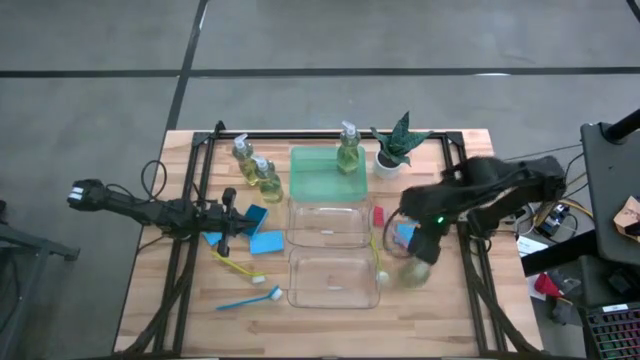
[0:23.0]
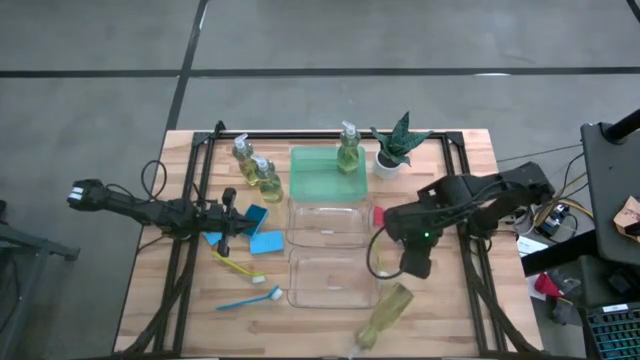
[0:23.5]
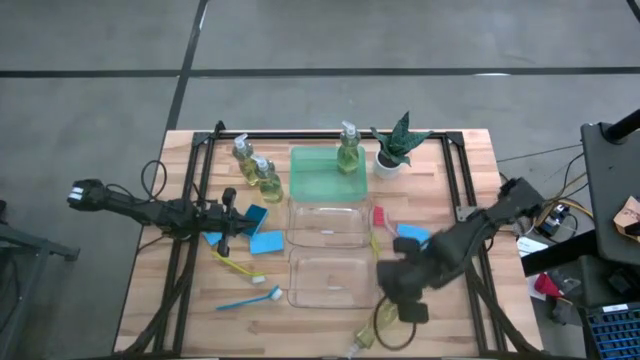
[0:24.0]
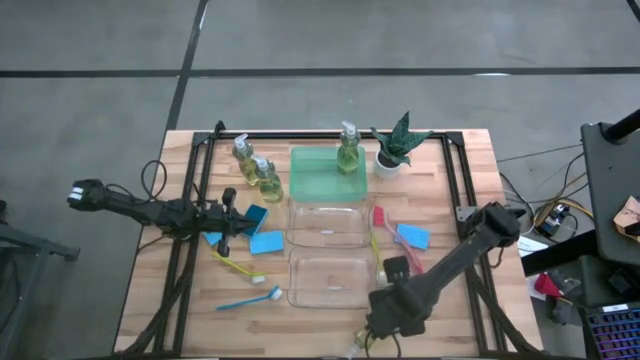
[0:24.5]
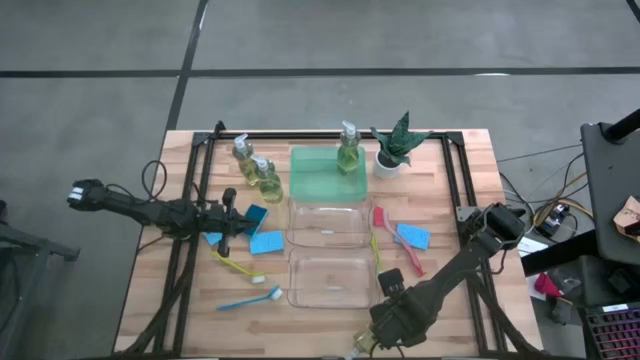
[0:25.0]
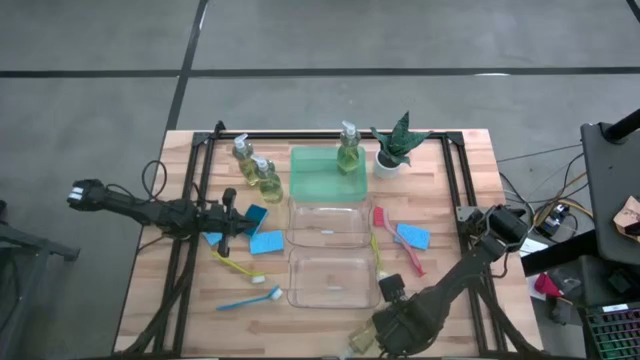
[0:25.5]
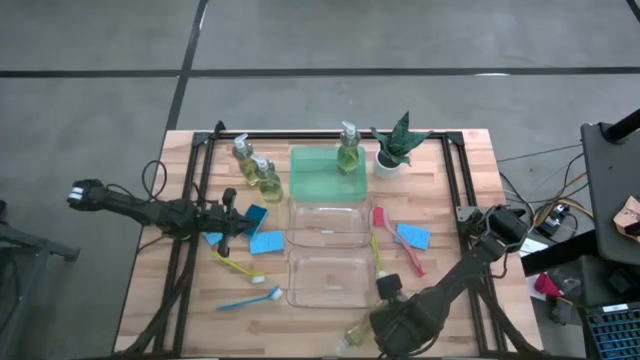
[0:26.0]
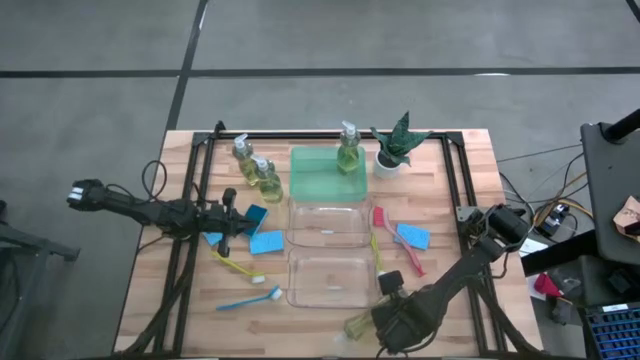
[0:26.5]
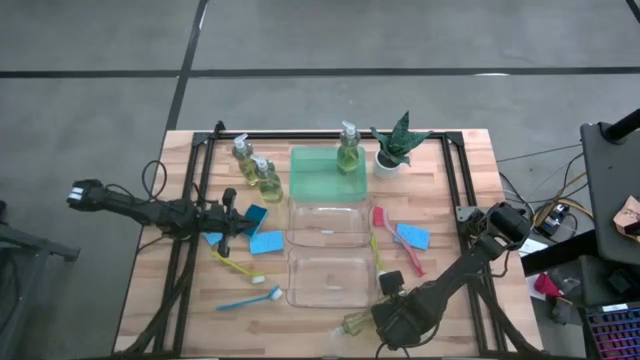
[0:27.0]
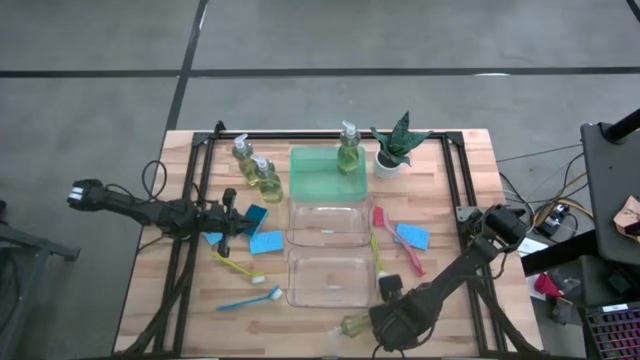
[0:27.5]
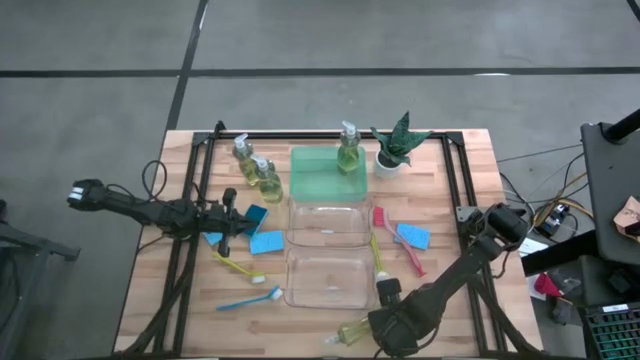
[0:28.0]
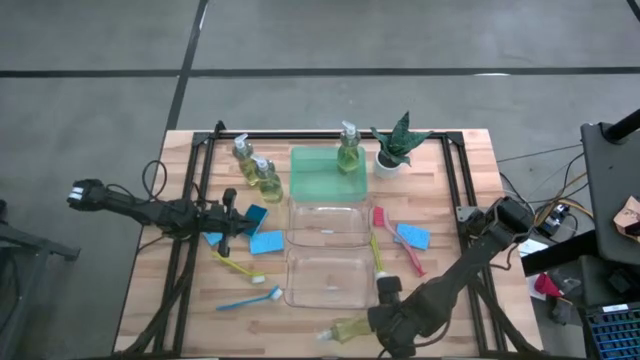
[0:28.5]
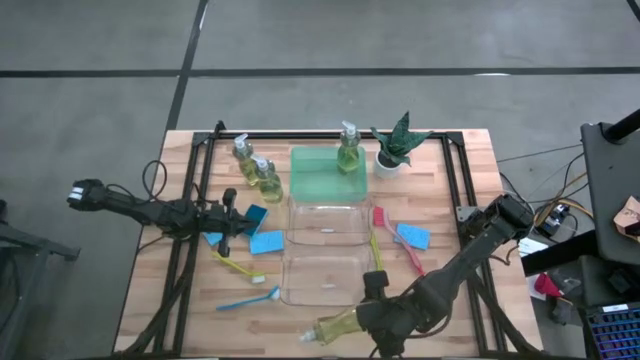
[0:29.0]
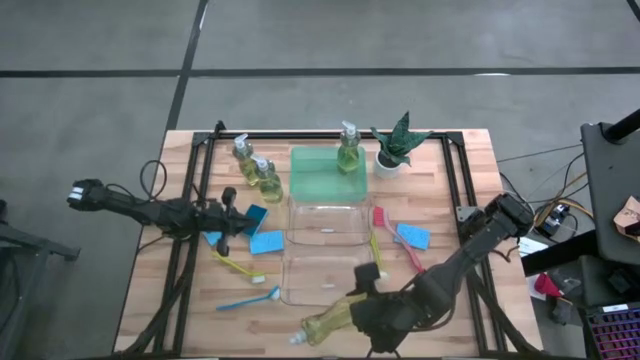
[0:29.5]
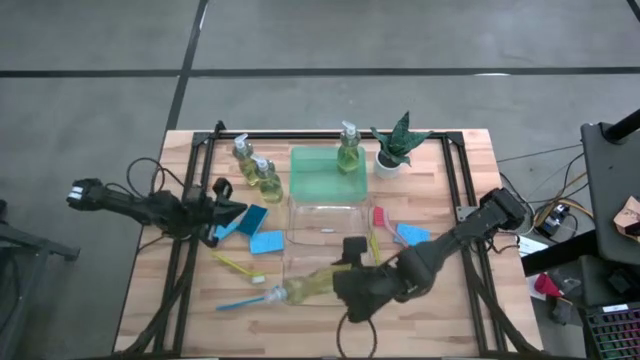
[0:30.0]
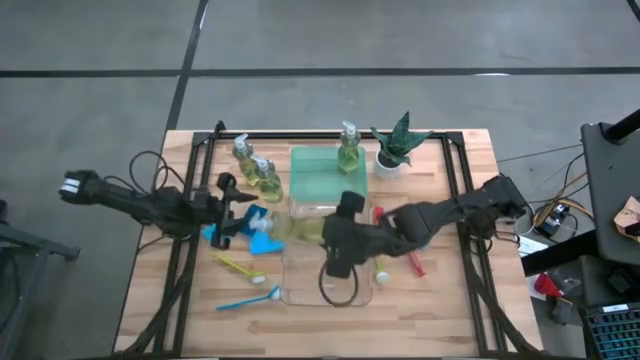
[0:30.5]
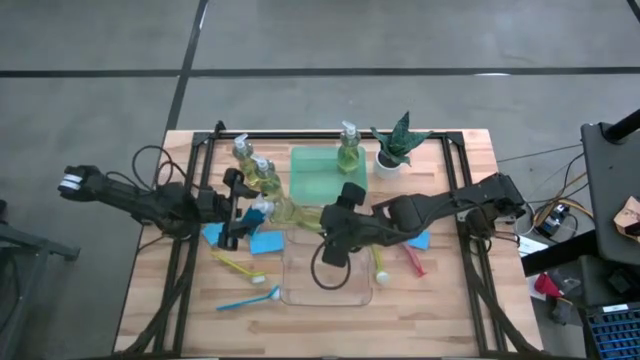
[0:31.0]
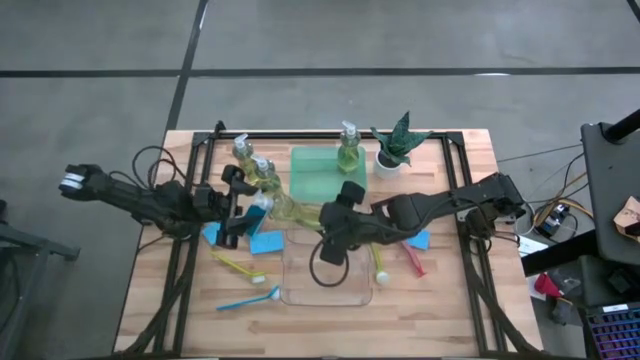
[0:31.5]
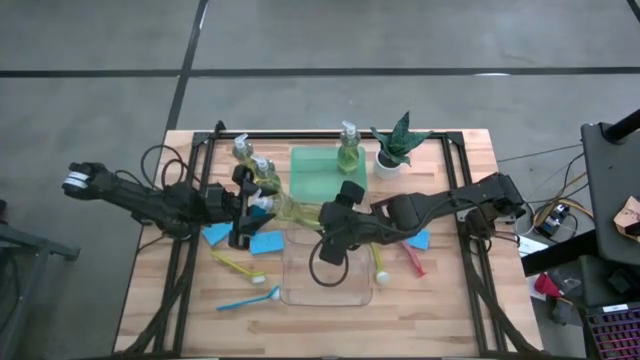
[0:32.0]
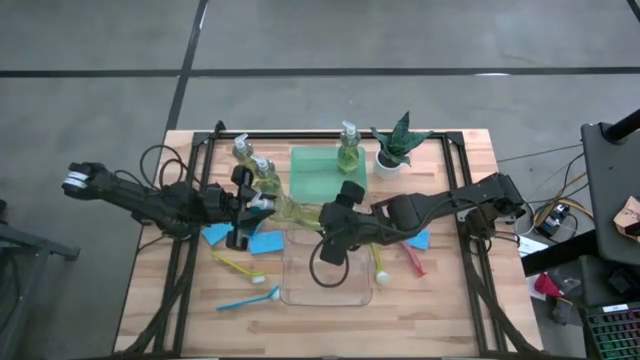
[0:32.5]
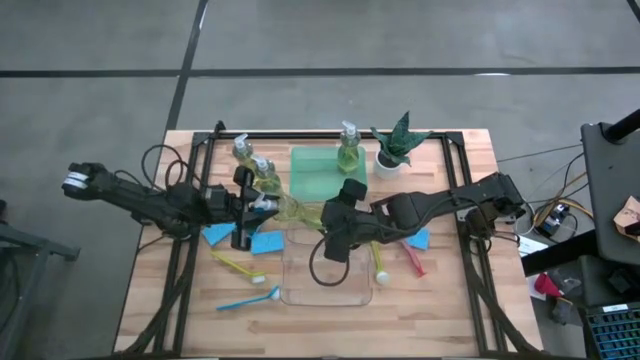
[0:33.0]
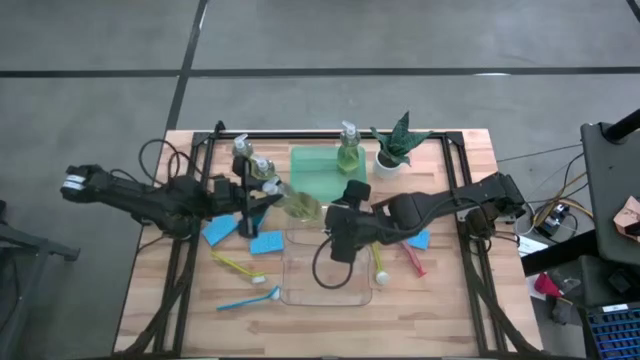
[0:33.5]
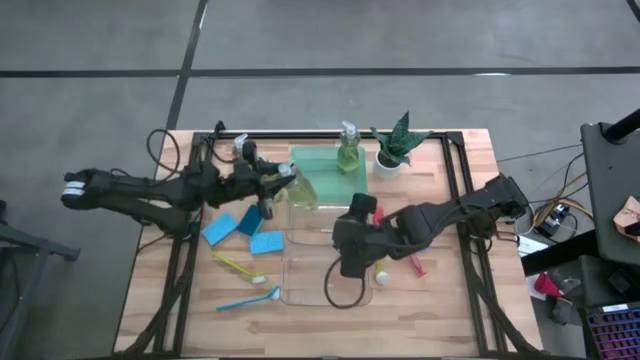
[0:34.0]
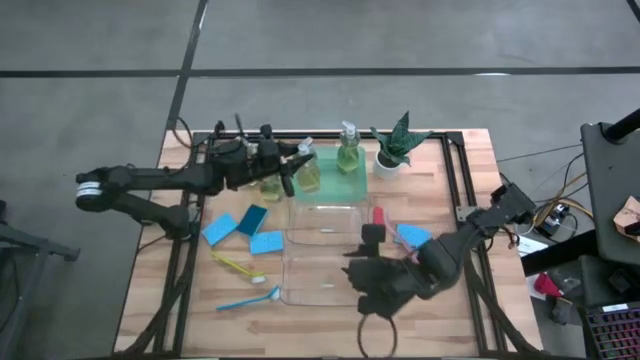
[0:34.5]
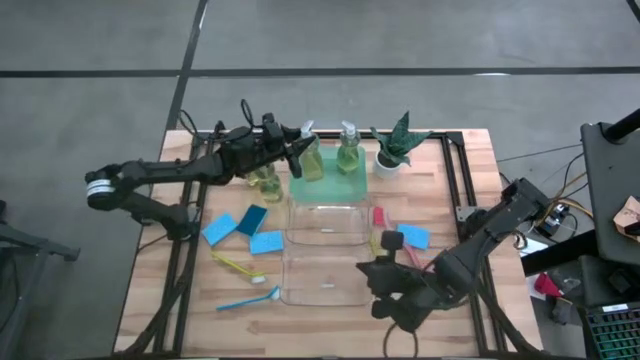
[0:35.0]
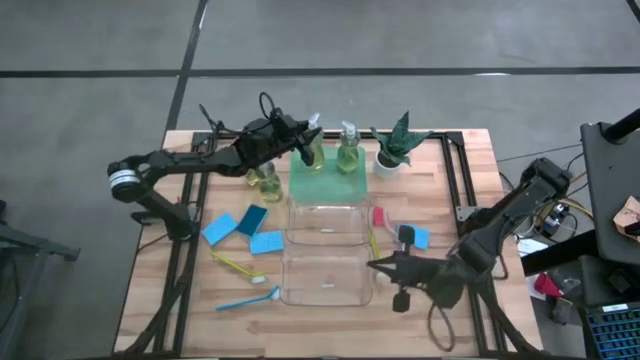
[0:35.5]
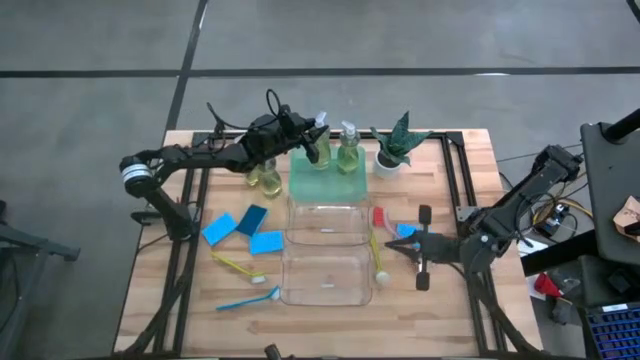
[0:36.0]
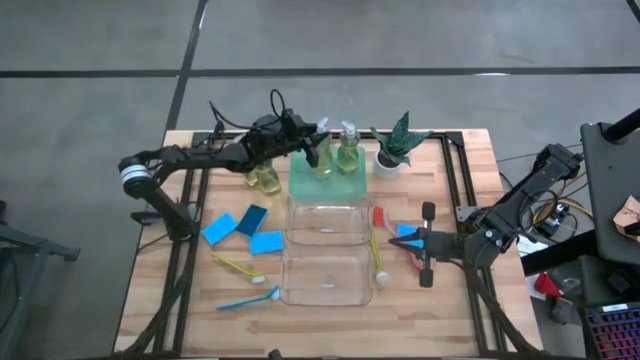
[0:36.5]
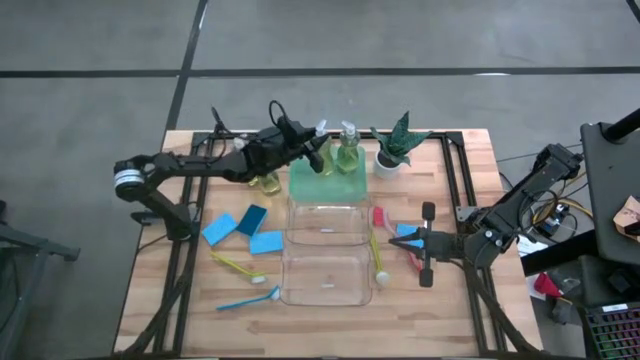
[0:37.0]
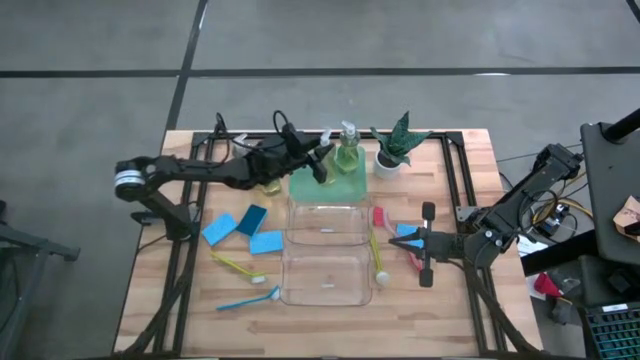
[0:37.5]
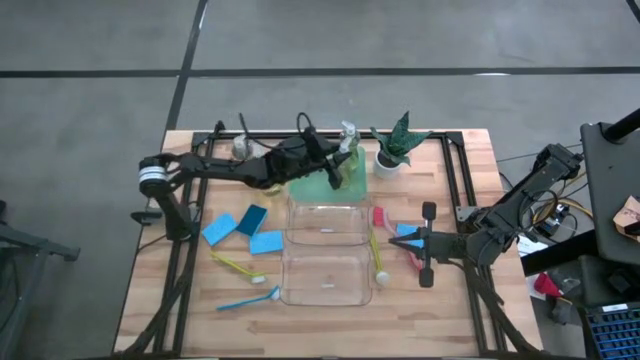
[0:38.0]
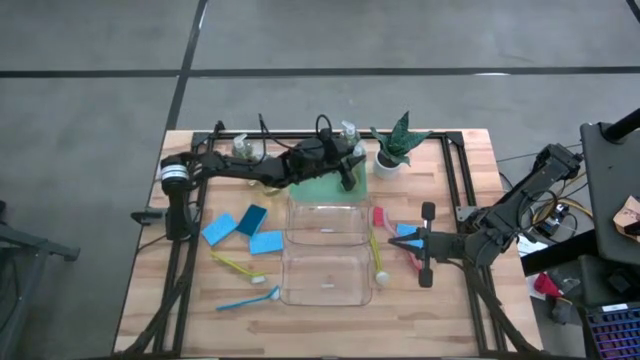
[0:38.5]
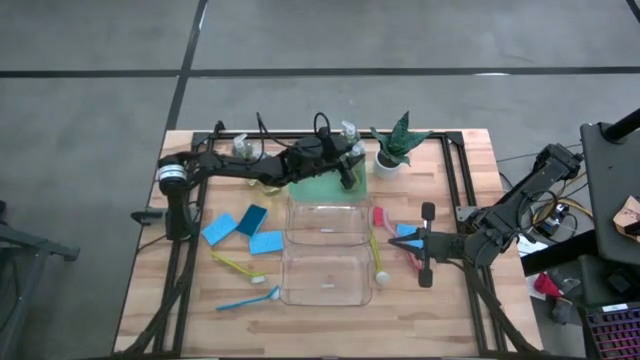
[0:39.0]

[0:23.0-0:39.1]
Task: Pick & Place Kitchen Sink Supplies
Put the transparent soap dispenser into the blue bin

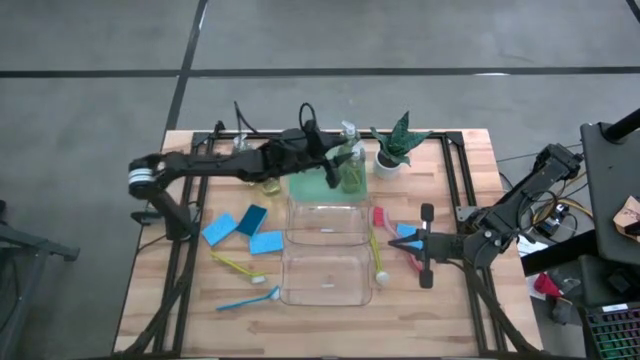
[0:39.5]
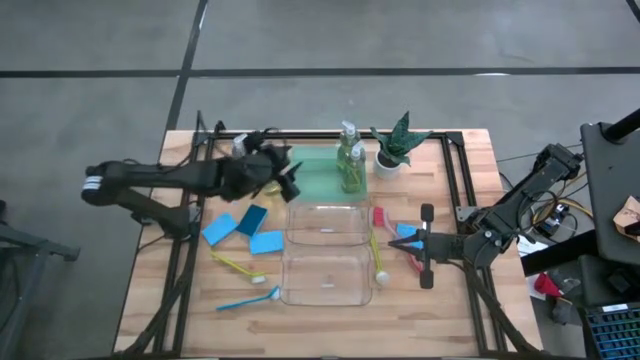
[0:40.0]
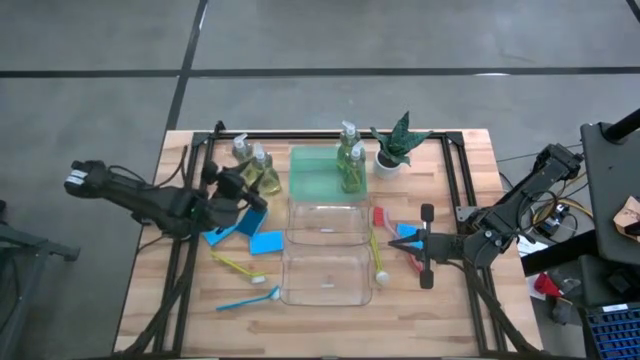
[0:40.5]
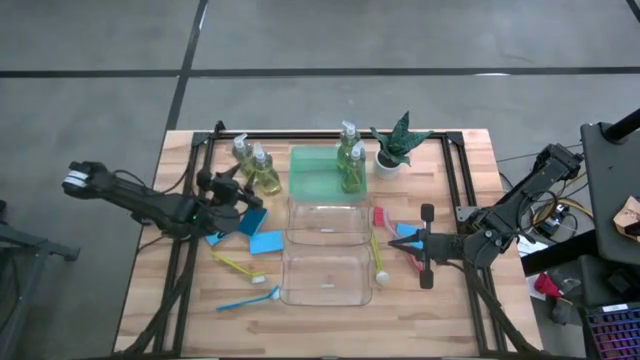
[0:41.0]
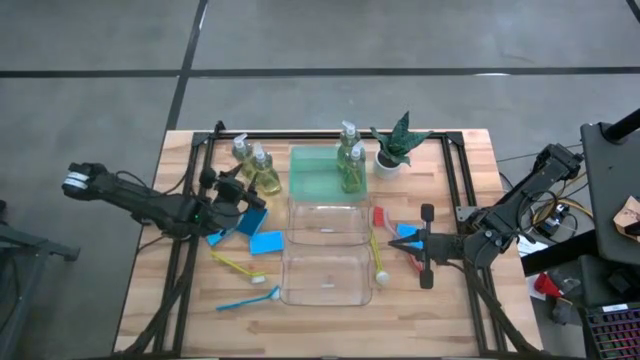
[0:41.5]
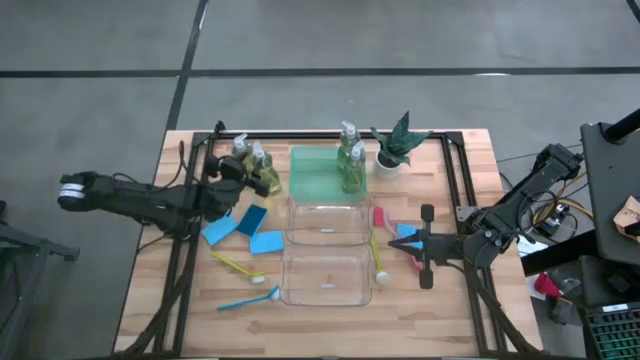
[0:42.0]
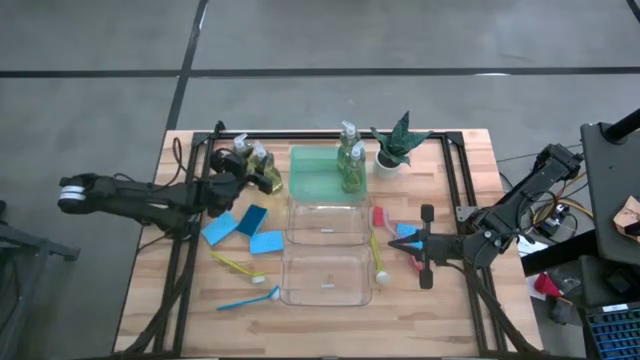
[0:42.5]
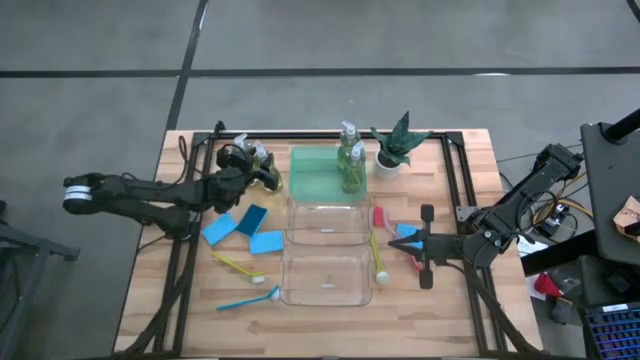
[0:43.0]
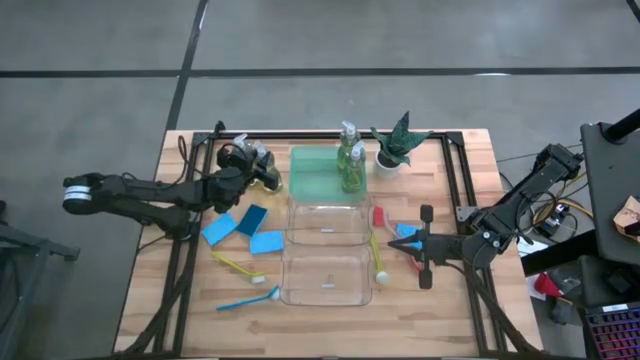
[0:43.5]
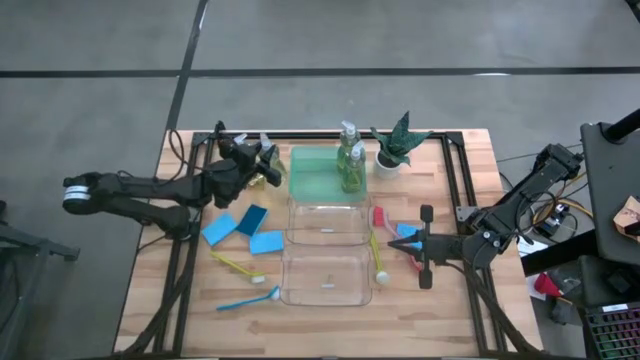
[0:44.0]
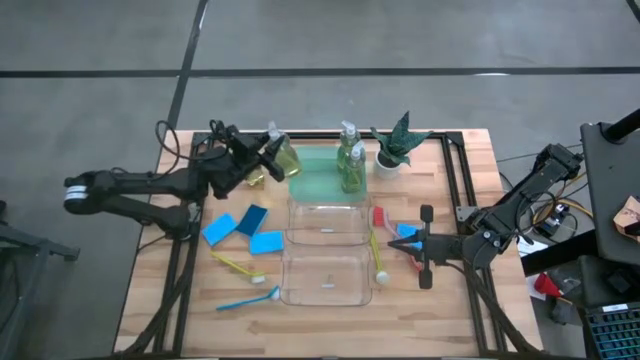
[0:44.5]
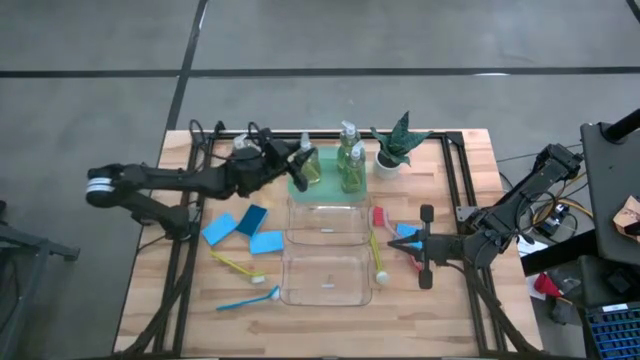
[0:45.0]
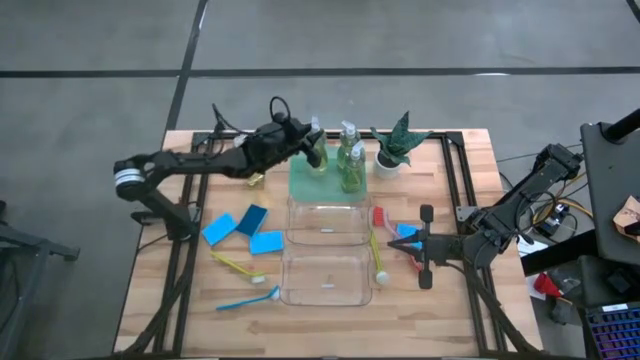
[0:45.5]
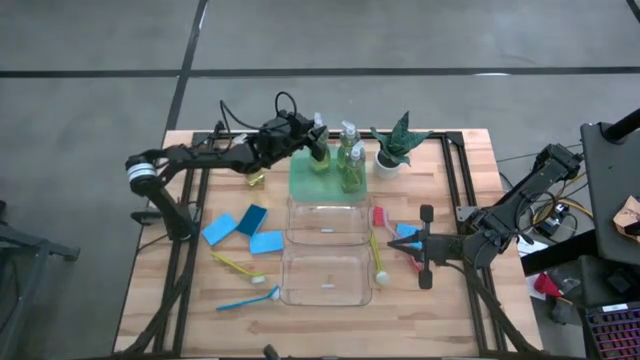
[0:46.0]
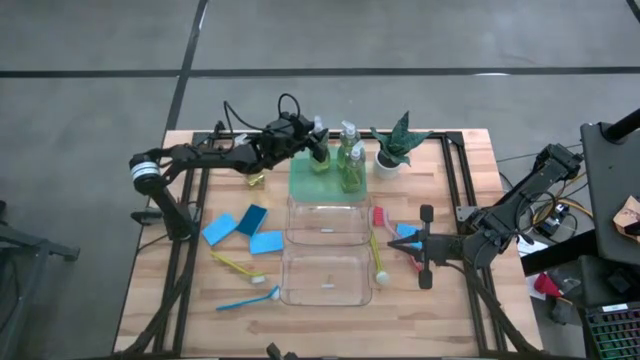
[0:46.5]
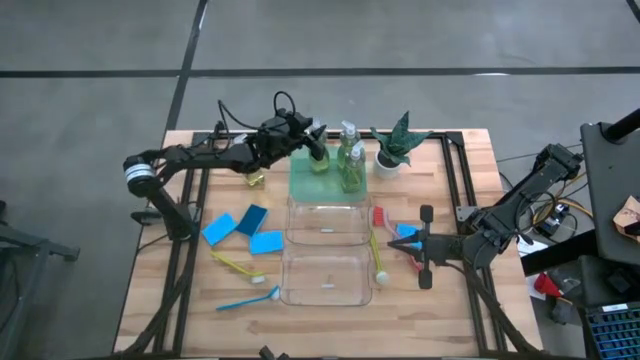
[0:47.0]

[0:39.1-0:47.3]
Put the transparent soap dispenser into the blue bin
